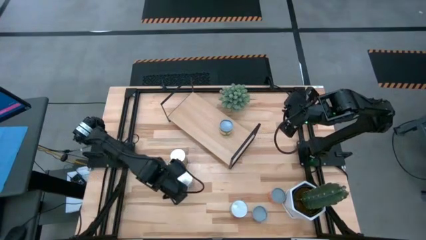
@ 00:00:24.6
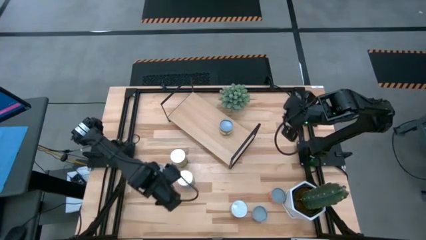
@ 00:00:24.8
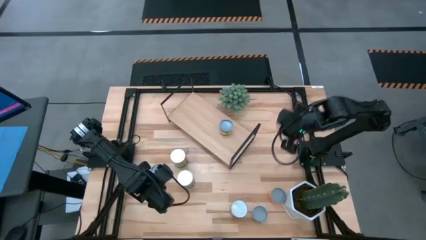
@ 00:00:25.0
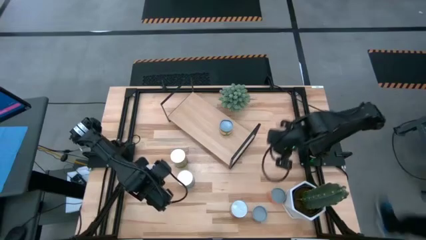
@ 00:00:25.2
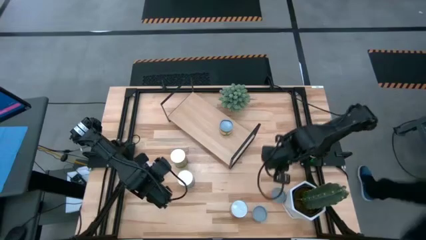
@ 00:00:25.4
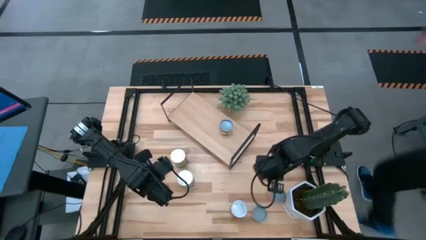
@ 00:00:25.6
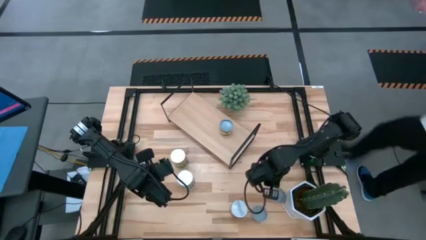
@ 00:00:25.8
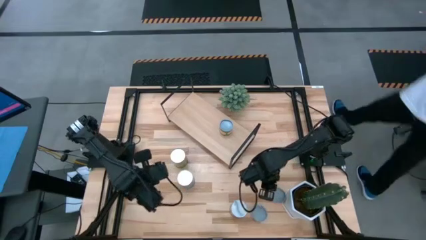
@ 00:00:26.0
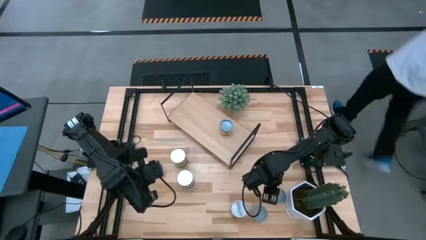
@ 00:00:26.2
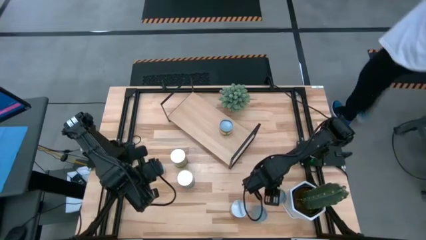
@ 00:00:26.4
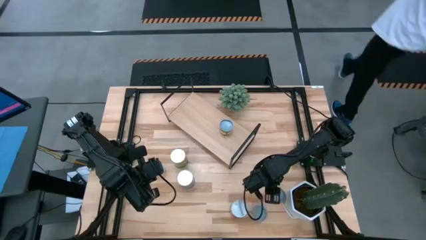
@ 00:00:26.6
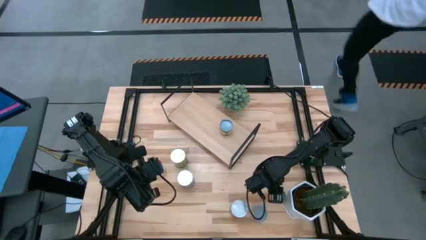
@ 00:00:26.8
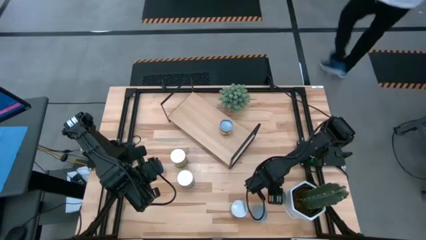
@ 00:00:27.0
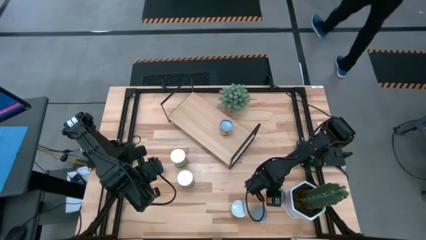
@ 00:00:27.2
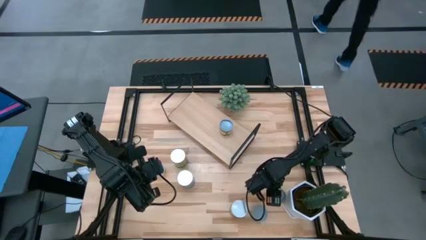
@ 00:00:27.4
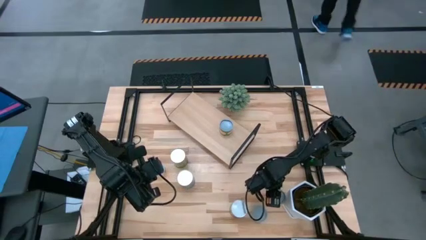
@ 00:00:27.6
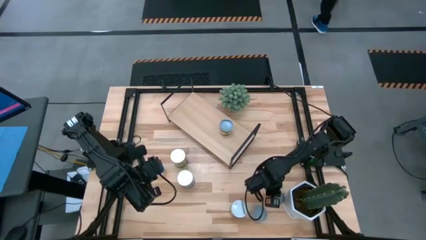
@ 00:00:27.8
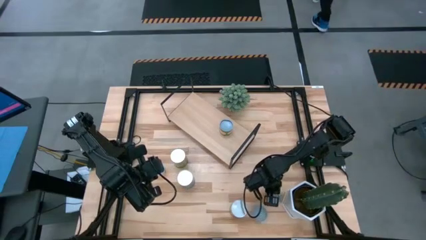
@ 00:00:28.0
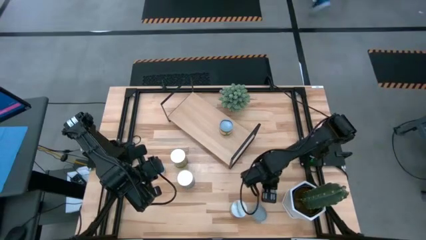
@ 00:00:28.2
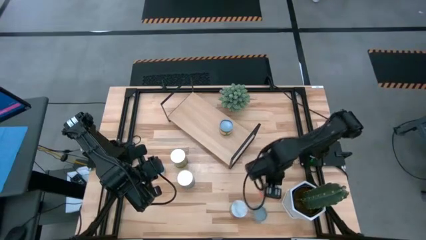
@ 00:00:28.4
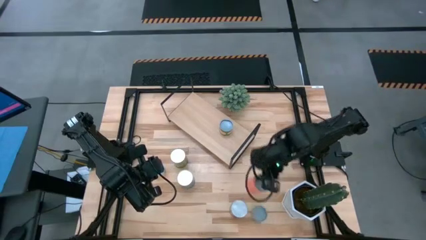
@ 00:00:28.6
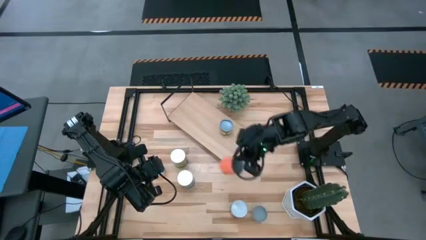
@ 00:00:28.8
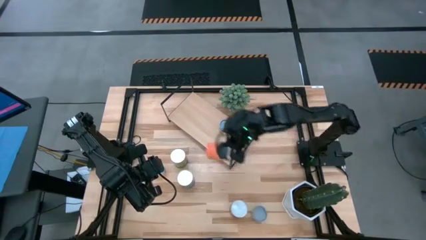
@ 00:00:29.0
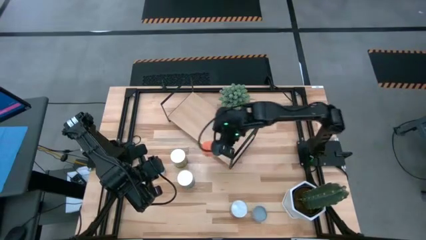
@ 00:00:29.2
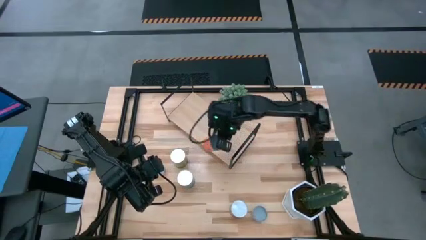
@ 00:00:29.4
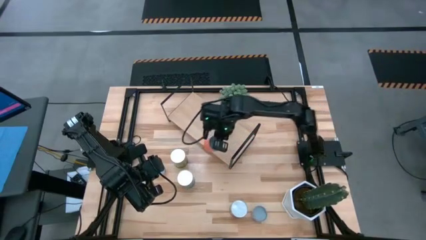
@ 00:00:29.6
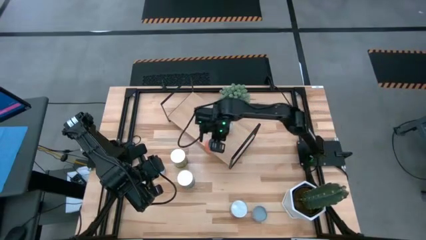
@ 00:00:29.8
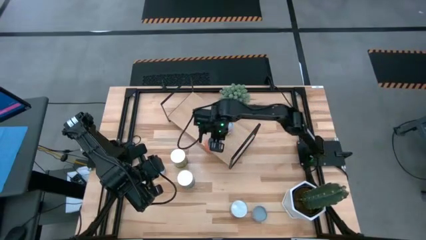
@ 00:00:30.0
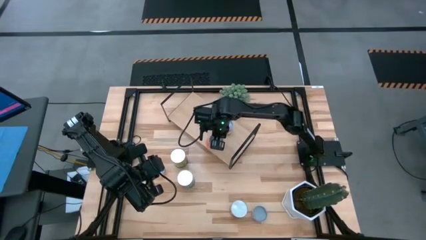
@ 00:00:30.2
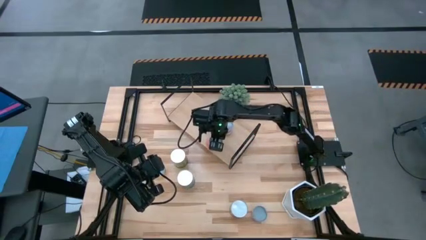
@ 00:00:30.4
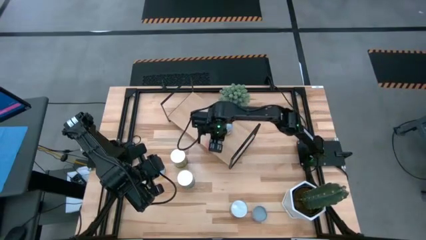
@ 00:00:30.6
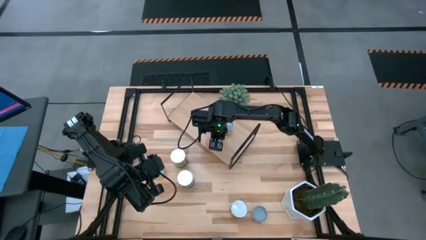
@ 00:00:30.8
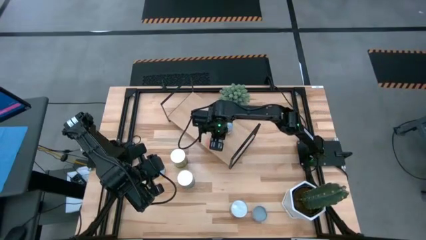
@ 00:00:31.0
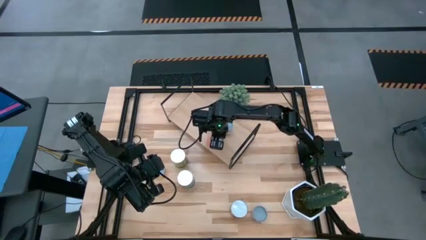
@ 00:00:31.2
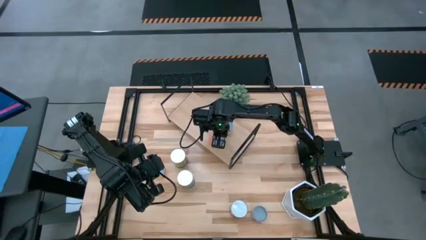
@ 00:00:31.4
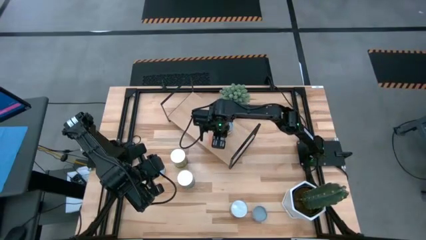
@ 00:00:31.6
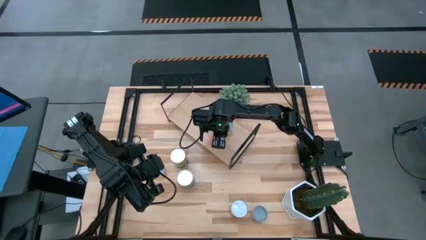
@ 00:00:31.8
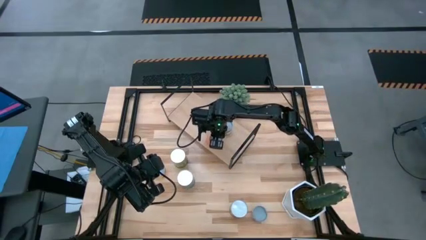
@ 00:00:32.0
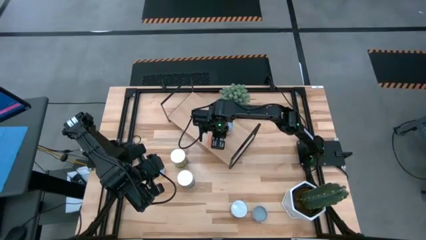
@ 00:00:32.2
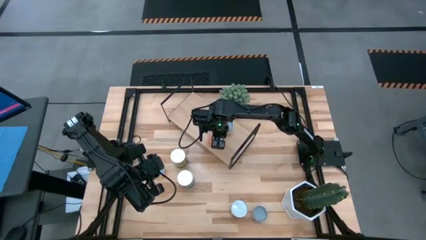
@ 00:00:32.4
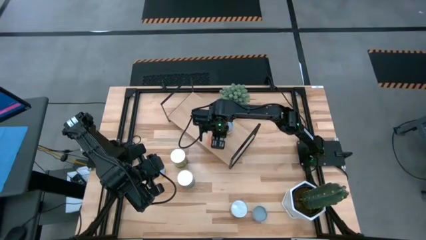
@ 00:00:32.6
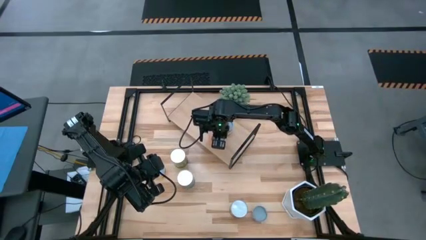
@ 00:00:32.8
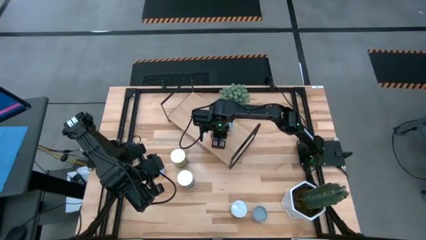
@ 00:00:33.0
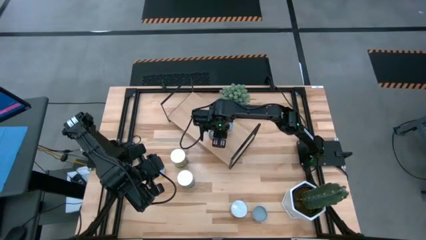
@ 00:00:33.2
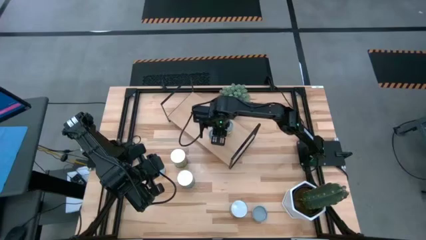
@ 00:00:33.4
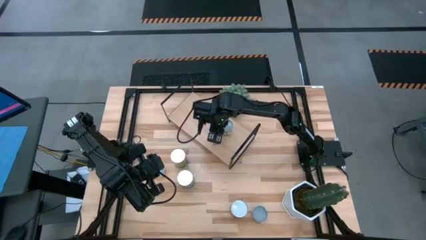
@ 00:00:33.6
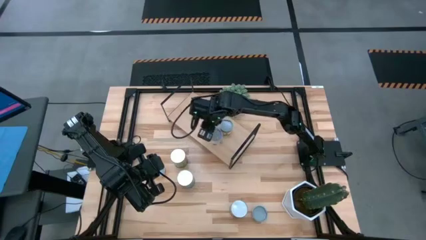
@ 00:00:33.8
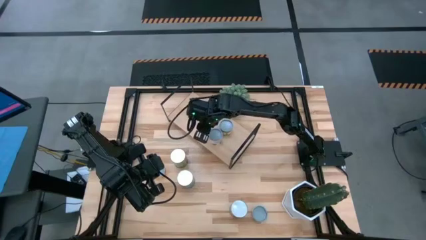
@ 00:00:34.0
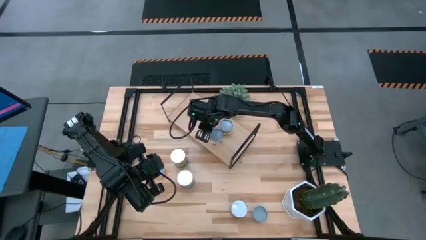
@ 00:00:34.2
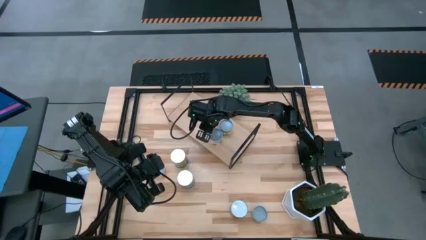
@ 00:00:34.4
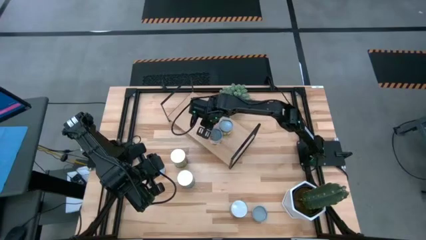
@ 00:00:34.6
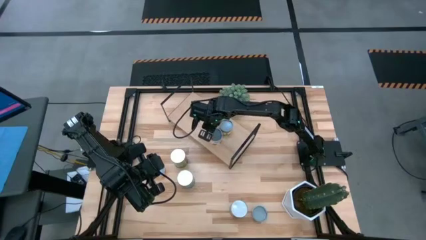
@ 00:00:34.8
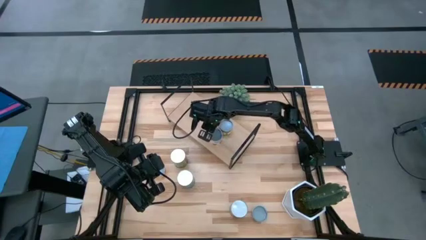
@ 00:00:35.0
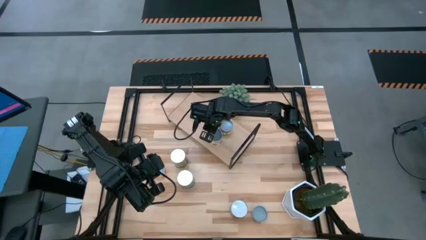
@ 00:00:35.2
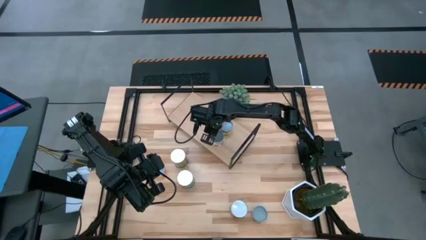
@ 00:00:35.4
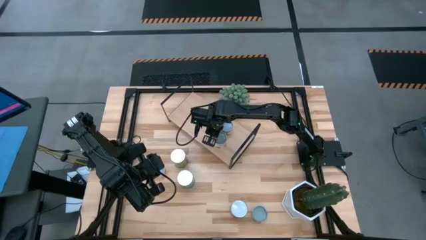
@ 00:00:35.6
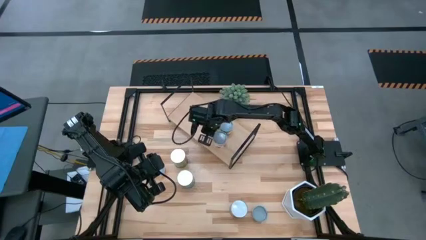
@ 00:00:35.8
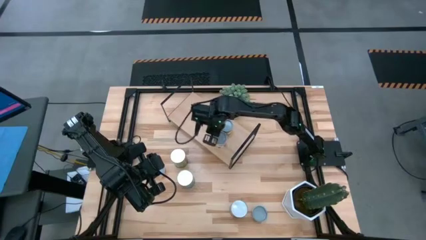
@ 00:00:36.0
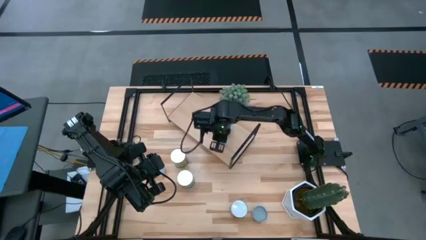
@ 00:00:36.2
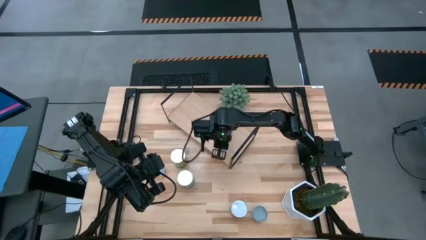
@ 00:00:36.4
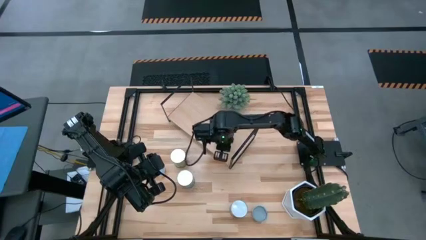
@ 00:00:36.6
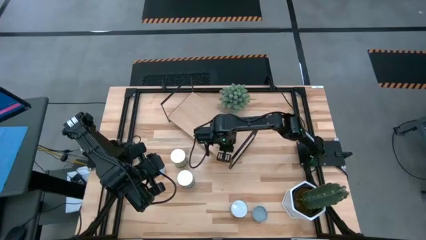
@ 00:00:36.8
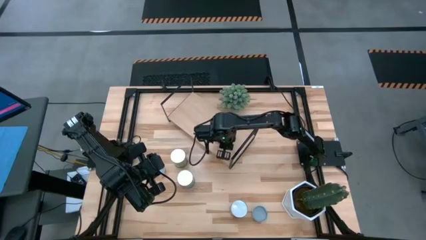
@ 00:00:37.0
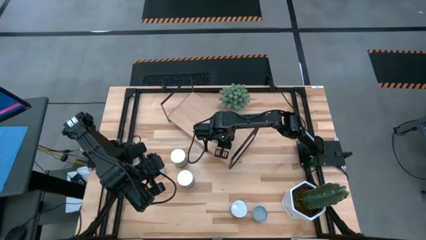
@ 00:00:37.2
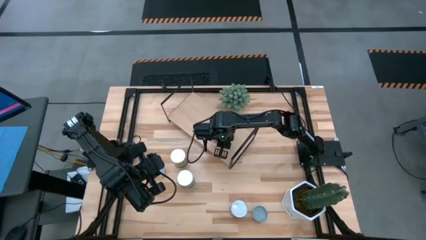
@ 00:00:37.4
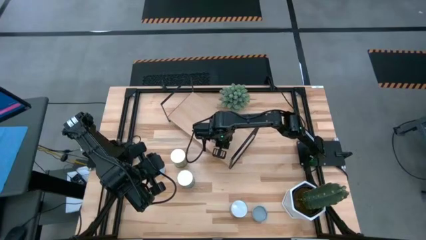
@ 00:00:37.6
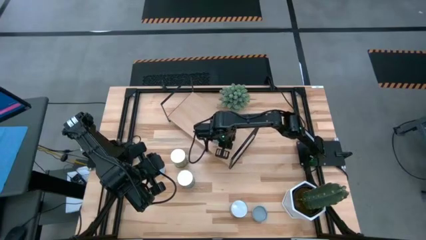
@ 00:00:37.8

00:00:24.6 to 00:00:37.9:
Task: Pick and place cans onto a shelf
Put the canned tomato sauce on the shelf
